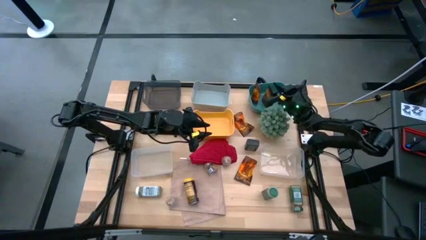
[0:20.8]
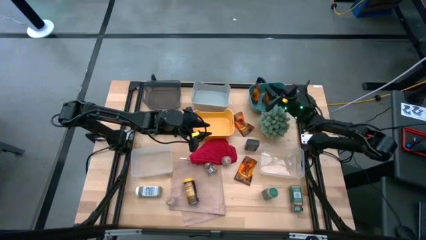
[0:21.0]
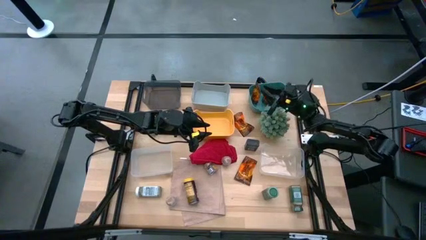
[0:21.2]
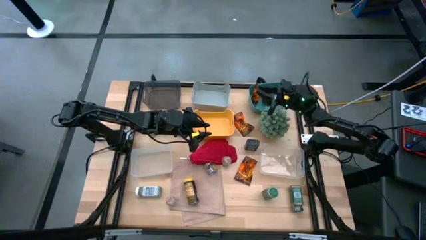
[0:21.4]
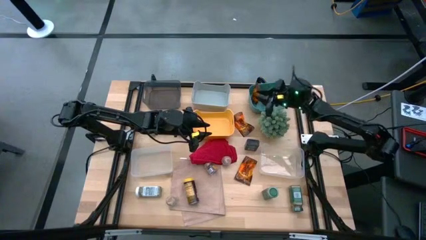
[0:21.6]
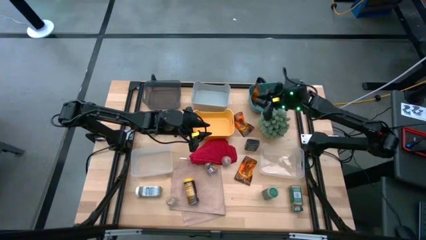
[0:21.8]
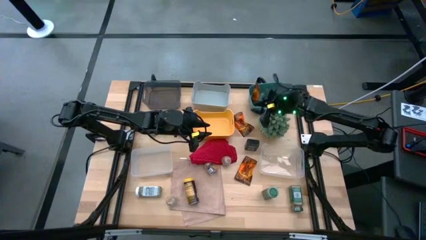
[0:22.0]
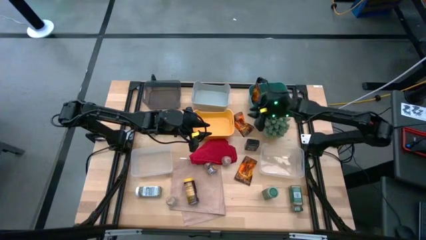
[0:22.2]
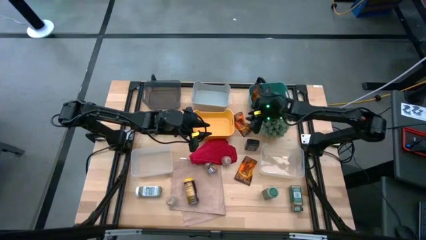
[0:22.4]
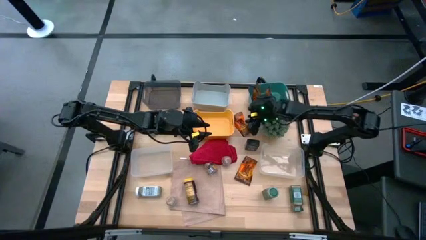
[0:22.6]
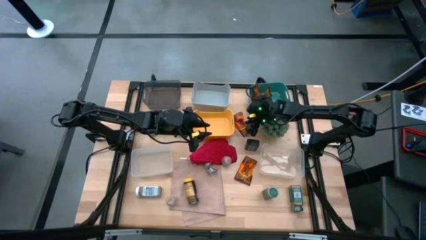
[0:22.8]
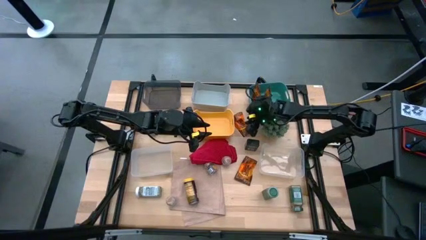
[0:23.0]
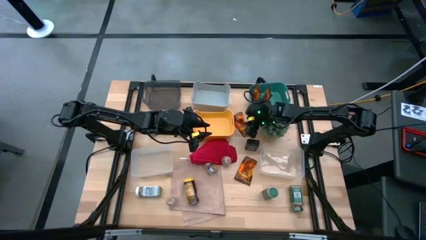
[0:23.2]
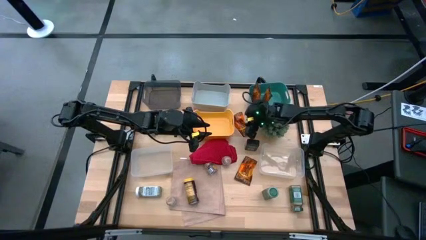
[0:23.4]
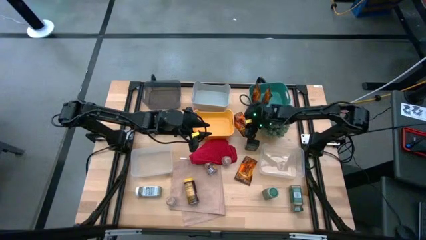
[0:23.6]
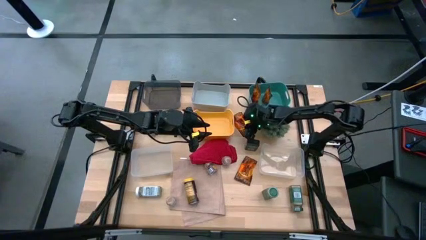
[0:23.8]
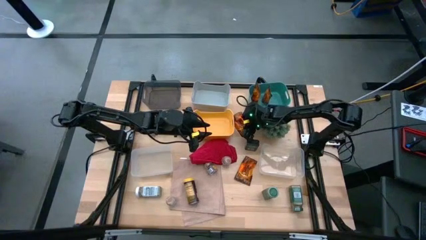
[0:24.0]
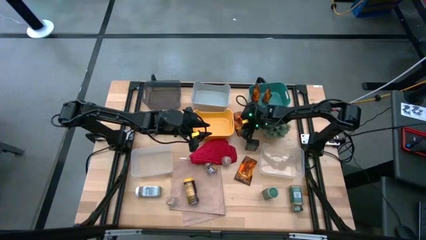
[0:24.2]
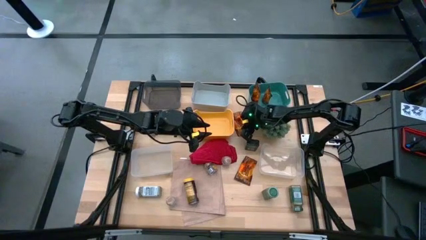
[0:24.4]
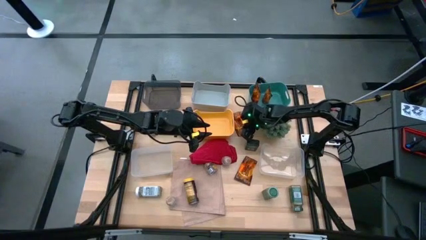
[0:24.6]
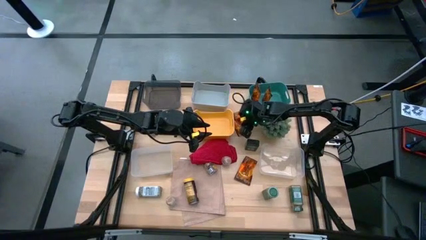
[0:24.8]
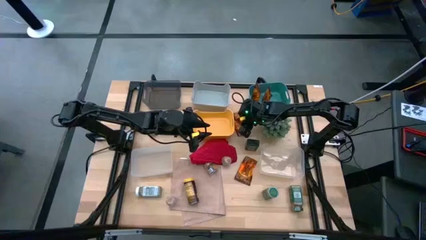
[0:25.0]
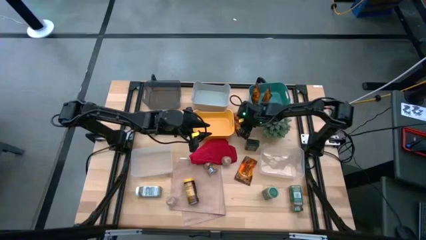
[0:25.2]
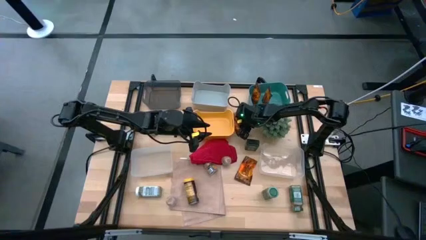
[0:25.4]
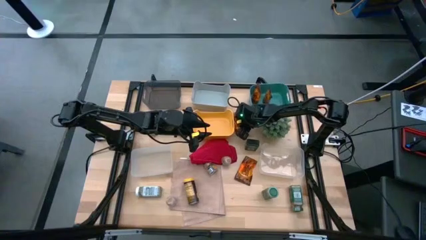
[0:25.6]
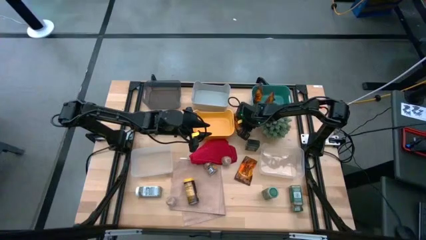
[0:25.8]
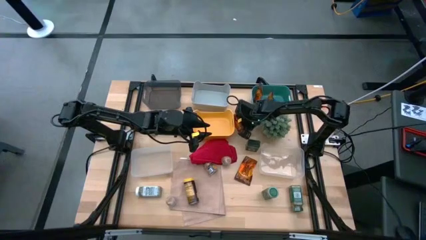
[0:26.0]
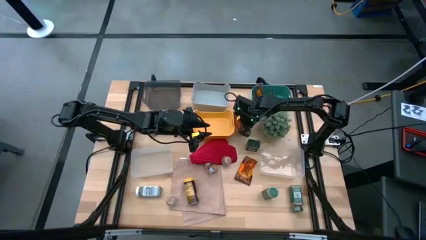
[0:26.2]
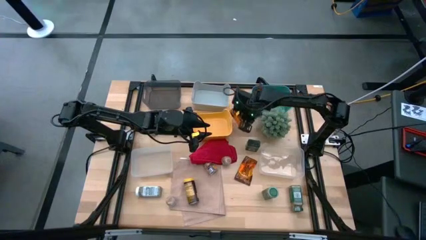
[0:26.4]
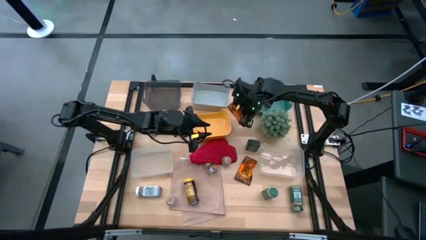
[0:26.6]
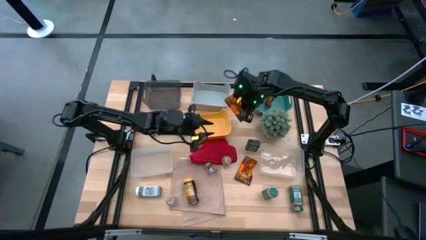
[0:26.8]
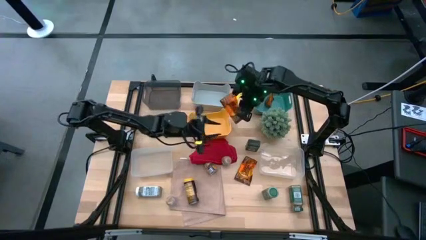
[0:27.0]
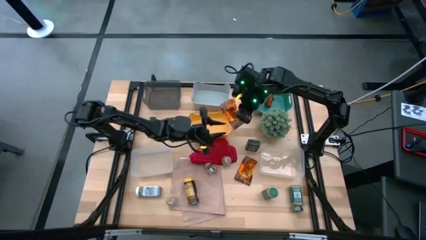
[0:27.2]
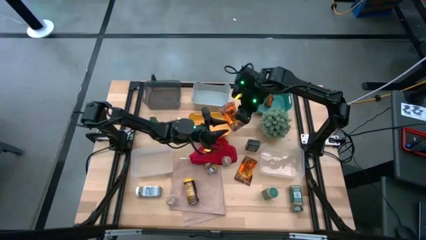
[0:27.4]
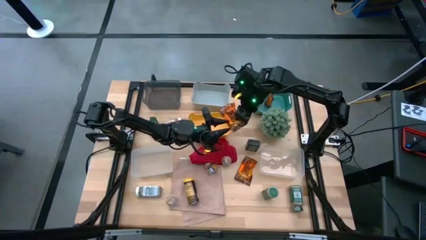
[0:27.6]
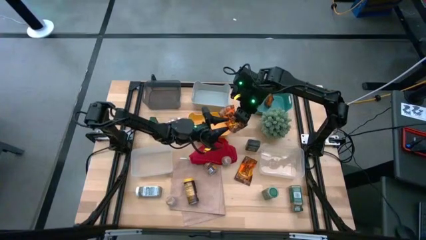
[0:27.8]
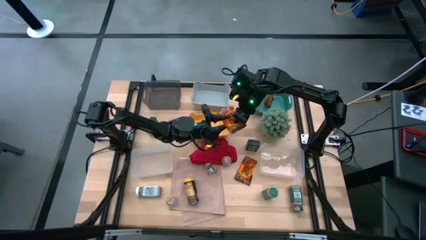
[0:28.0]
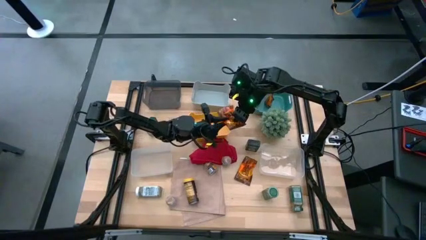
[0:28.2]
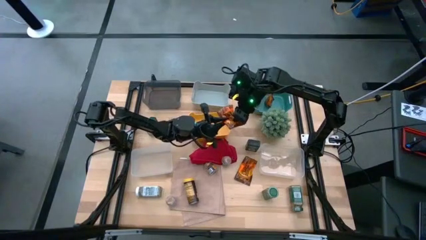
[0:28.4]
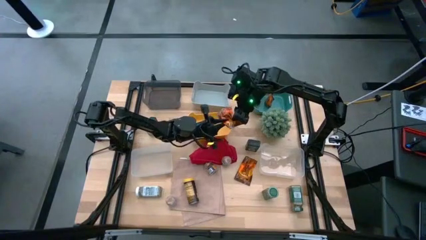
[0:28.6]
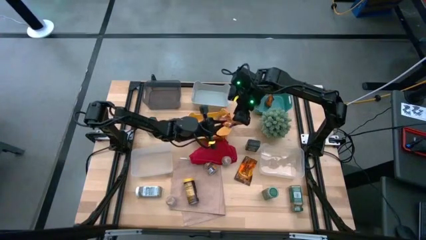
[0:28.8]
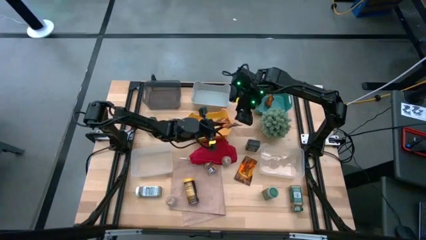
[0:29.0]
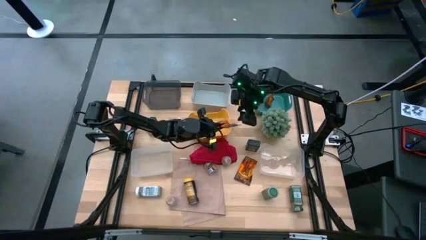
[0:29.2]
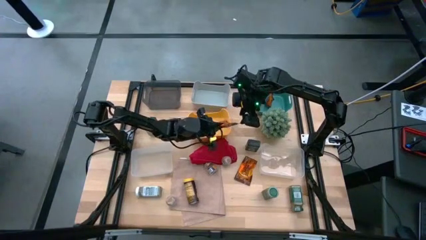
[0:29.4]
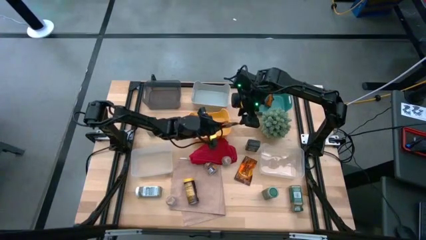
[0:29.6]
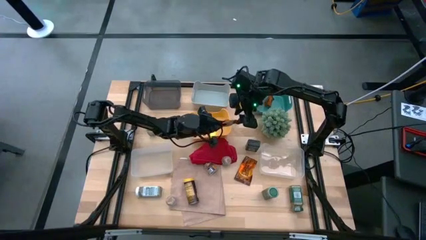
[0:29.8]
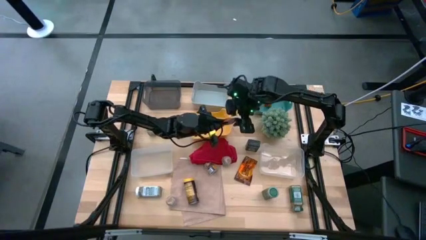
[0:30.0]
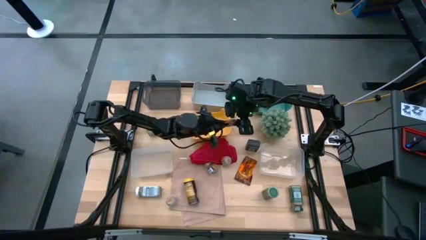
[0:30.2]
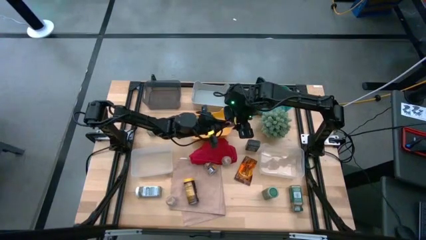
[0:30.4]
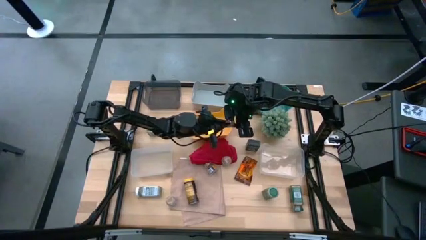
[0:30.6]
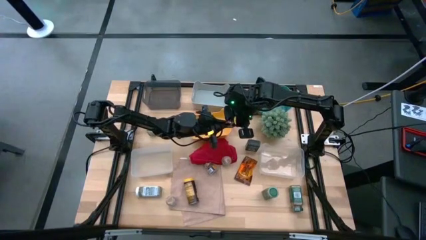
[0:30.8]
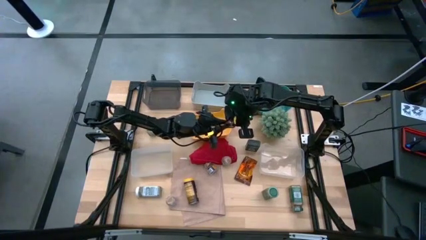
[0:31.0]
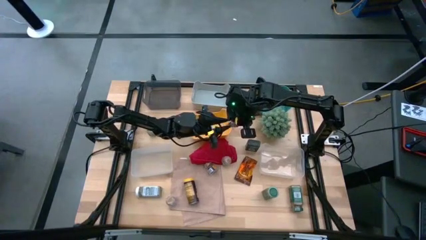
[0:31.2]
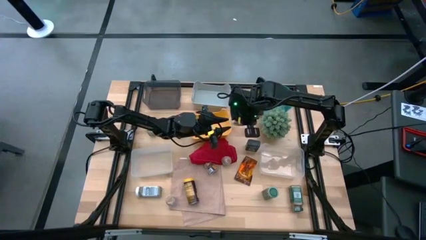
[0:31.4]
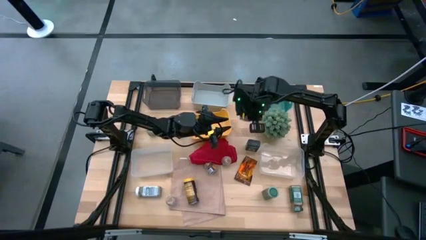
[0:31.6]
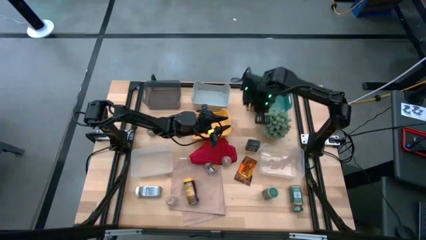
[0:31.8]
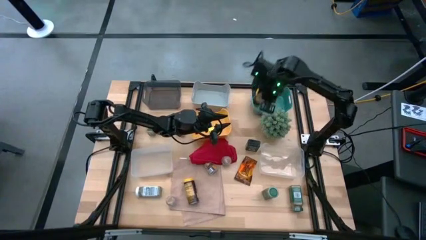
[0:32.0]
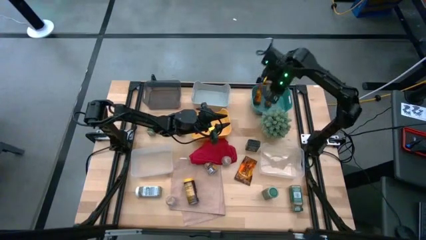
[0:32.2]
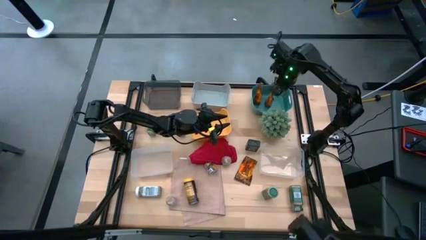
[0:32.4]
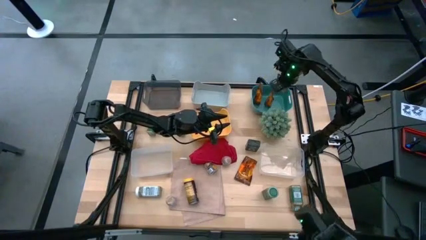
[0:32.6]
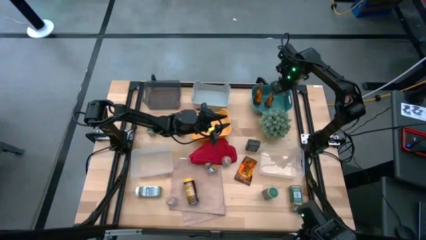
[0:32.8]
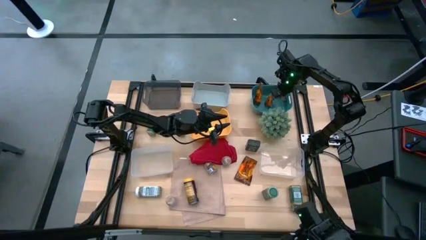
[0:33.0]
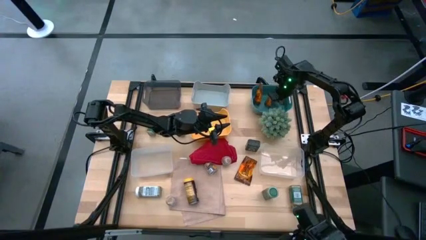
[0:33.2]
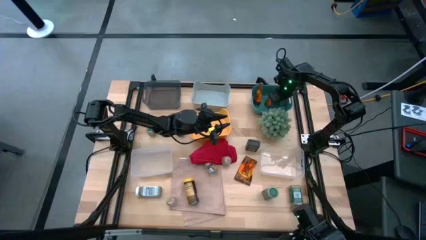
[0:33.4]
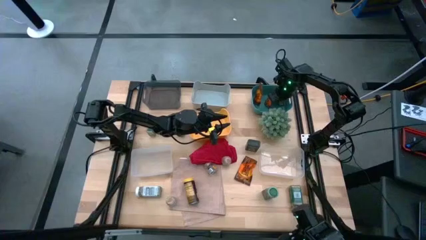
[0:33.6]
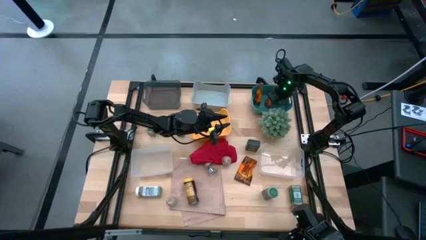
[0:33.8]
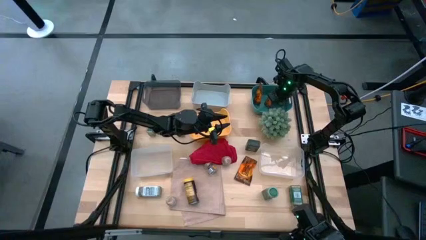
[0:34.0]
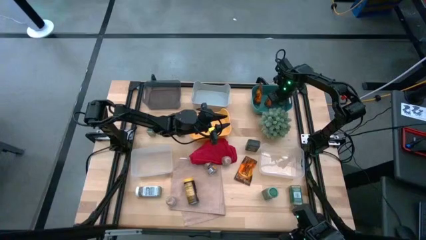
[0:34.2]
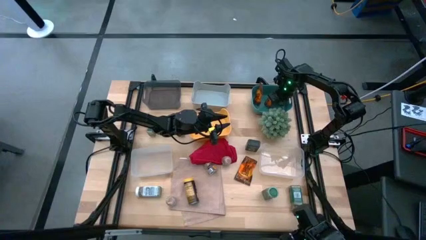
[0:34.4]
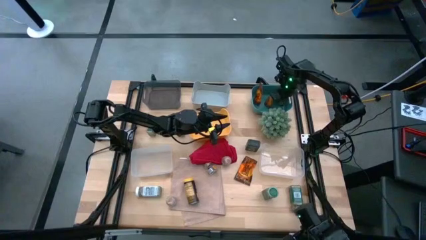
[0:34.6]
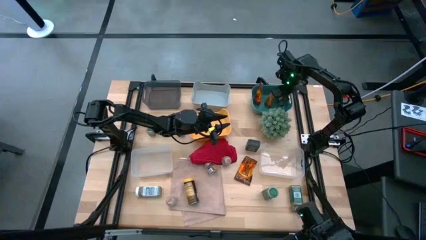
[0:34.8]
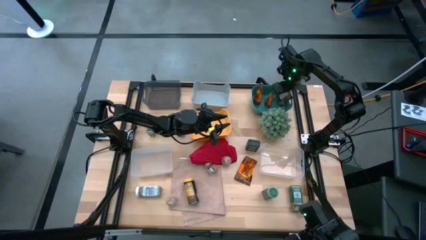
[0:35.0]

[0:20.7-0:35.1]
Task: Sort spices by type
Put the brown seasoning pack into the green bin
